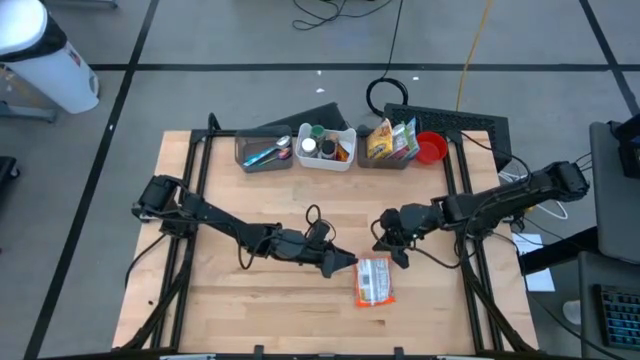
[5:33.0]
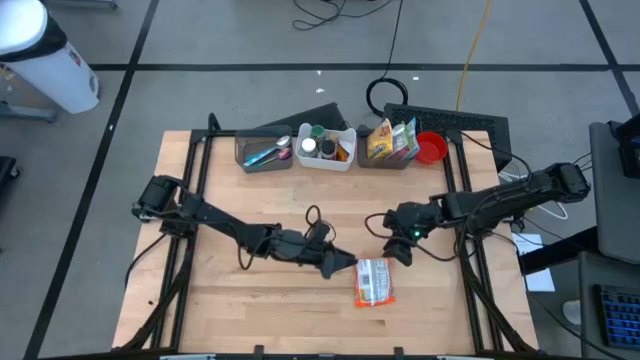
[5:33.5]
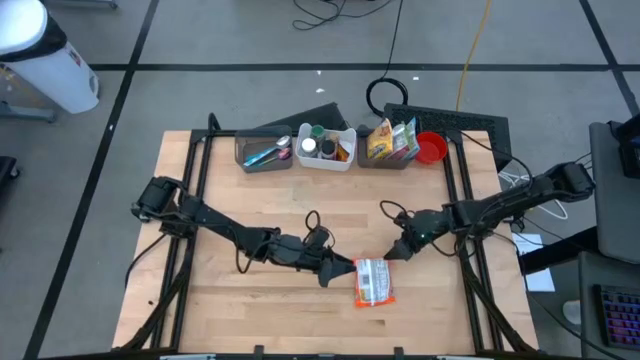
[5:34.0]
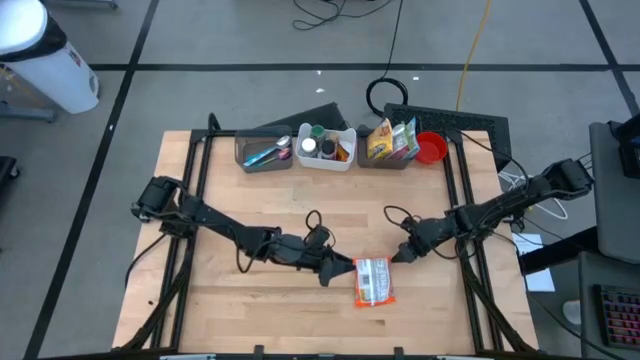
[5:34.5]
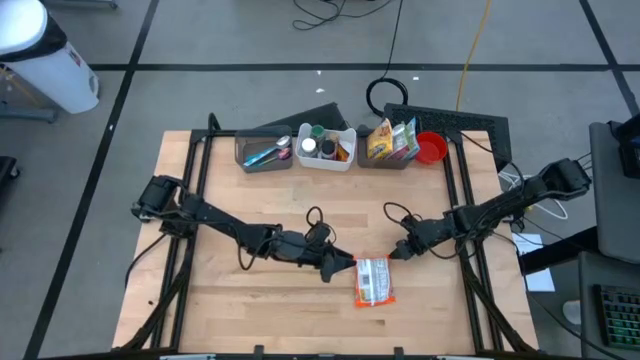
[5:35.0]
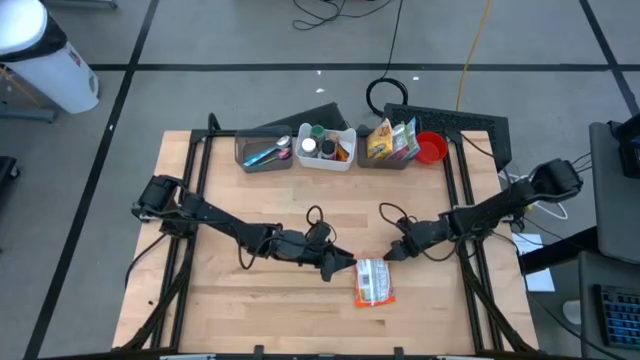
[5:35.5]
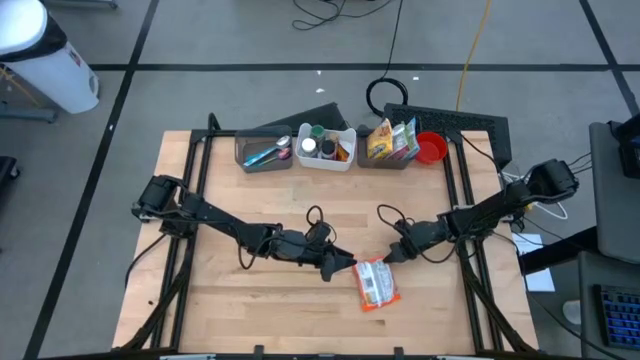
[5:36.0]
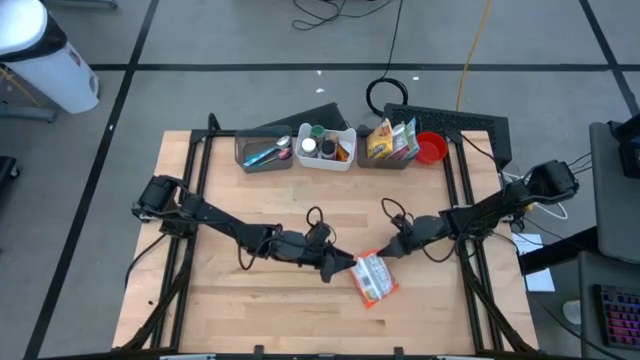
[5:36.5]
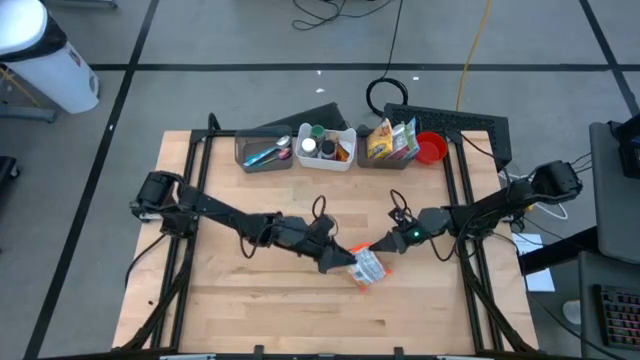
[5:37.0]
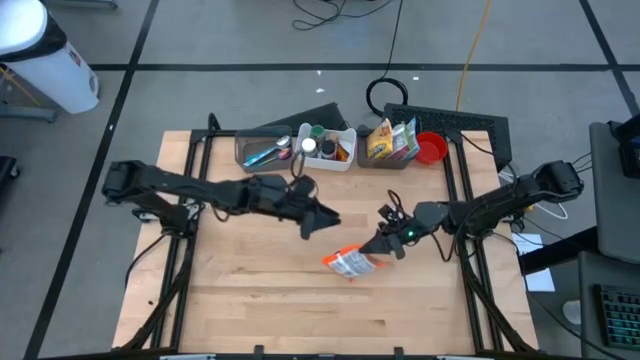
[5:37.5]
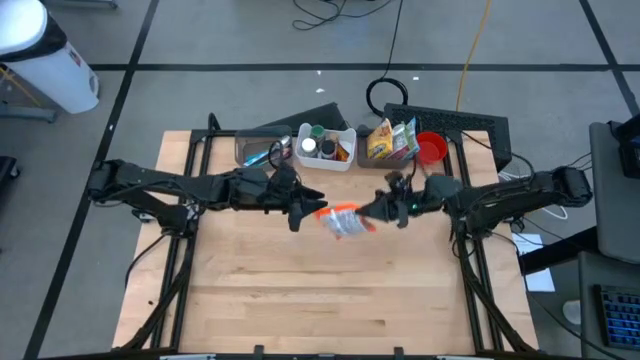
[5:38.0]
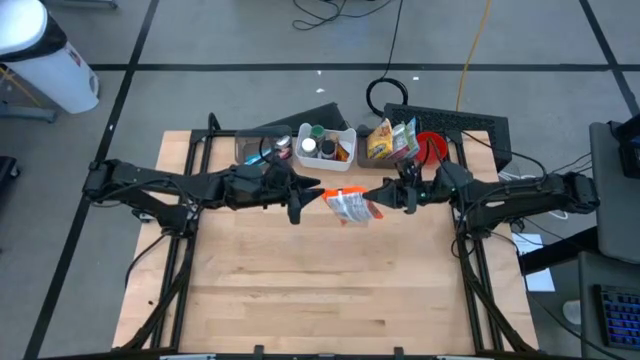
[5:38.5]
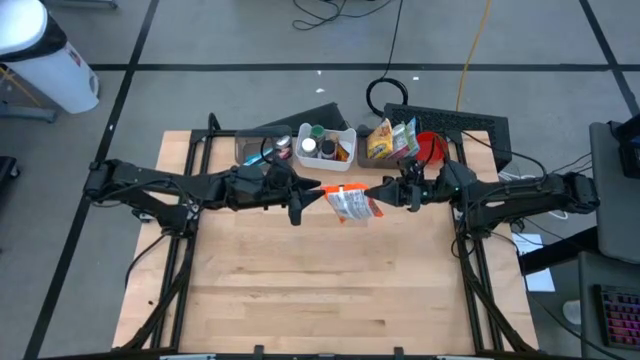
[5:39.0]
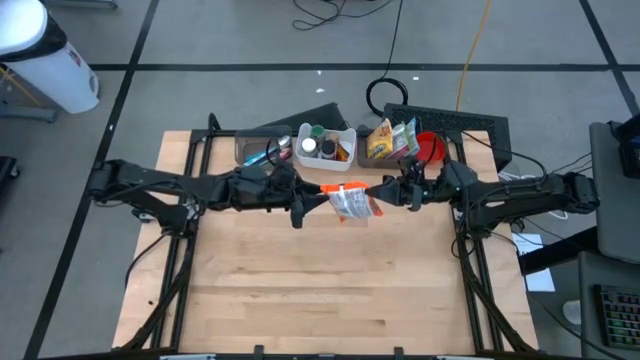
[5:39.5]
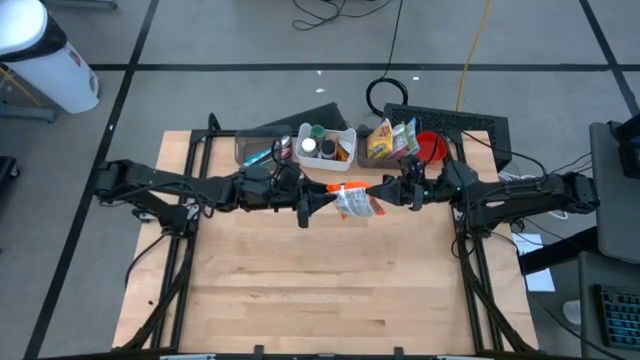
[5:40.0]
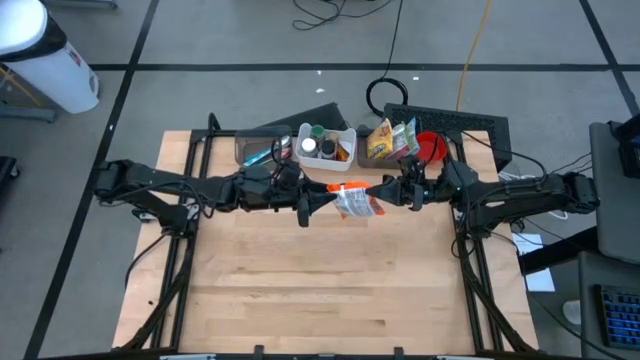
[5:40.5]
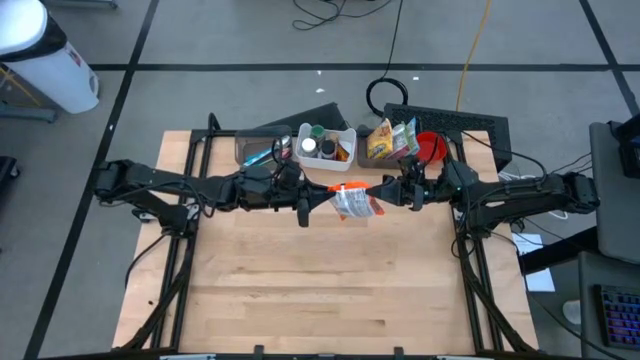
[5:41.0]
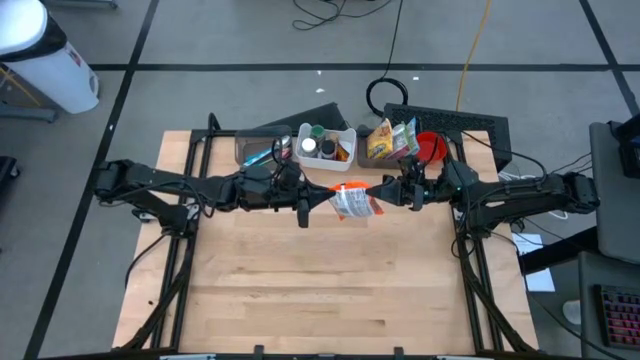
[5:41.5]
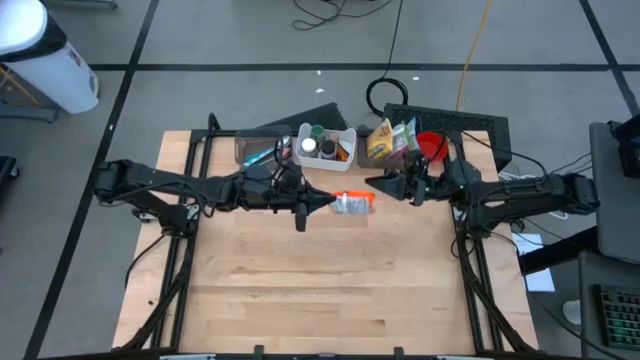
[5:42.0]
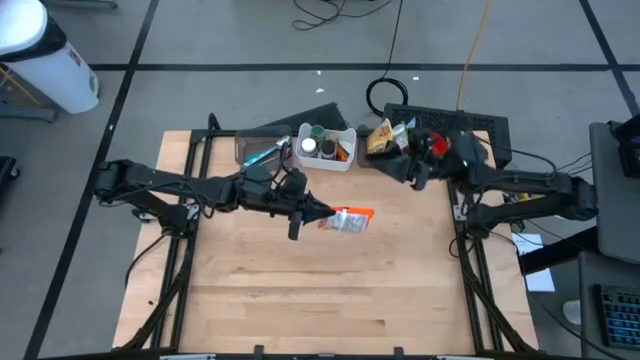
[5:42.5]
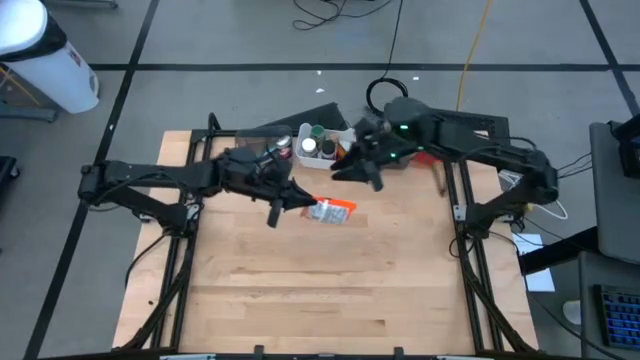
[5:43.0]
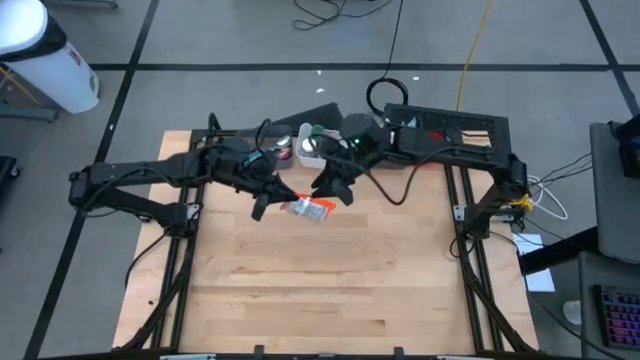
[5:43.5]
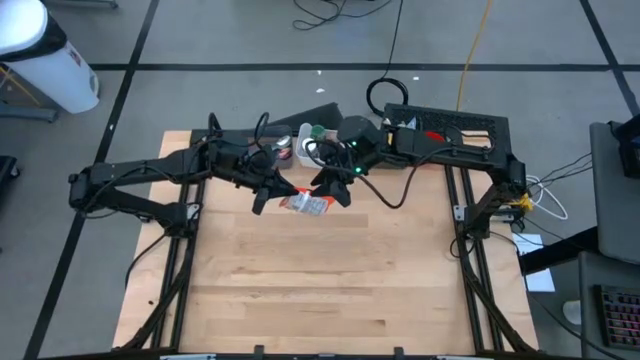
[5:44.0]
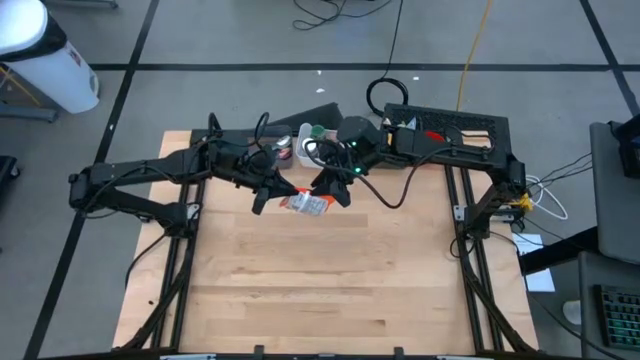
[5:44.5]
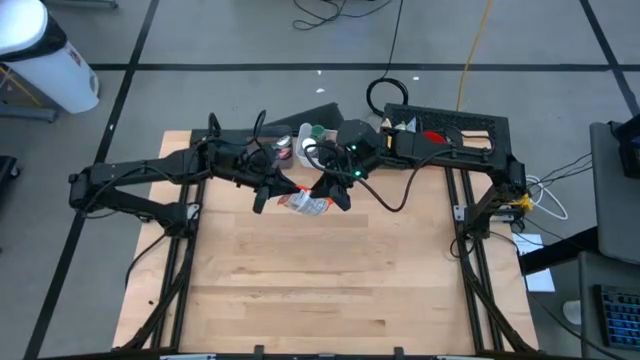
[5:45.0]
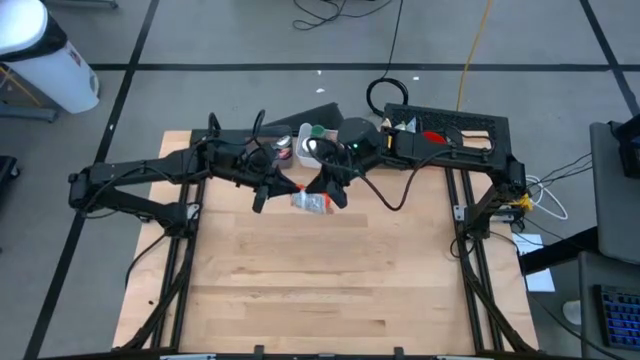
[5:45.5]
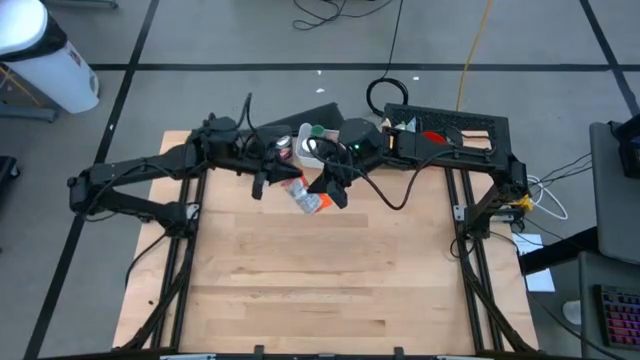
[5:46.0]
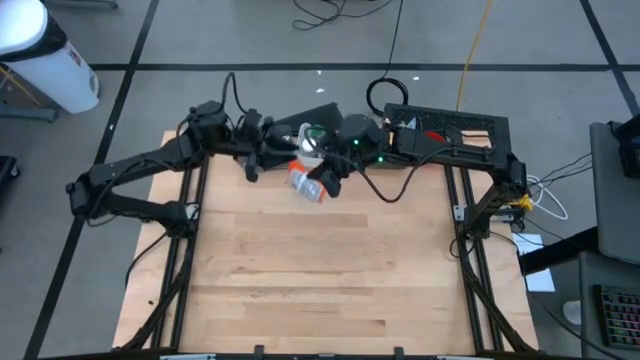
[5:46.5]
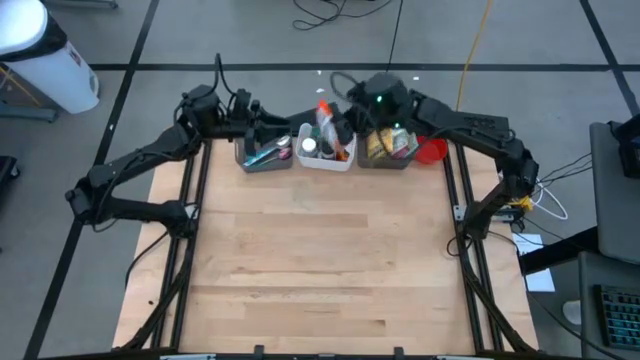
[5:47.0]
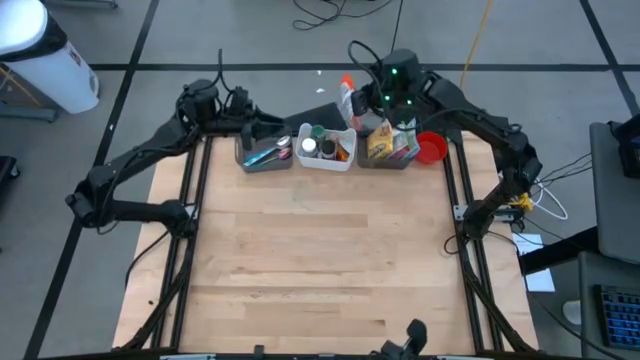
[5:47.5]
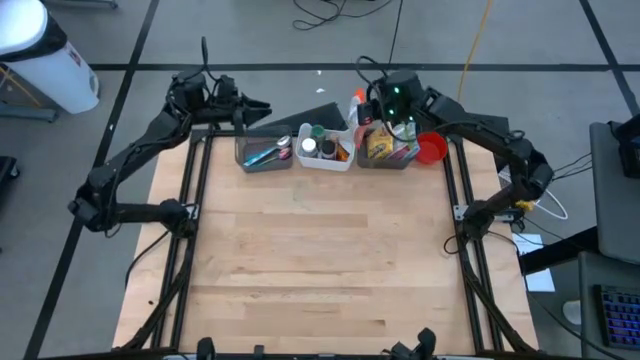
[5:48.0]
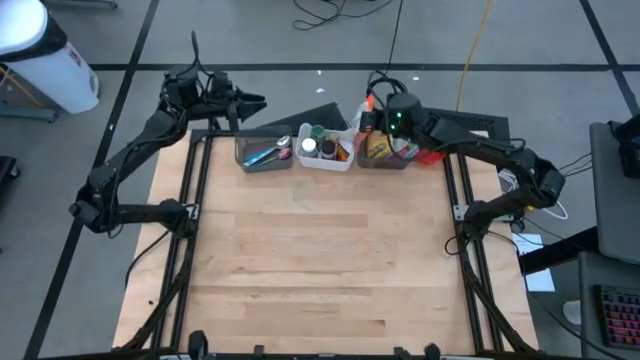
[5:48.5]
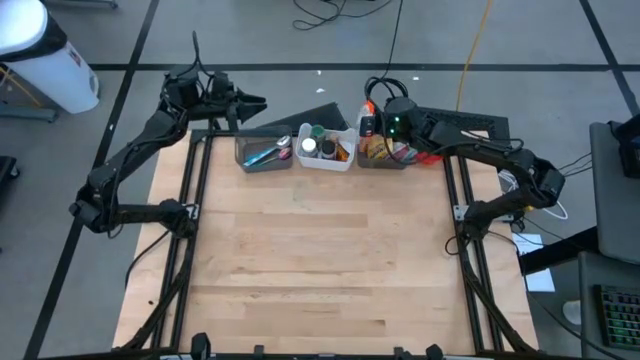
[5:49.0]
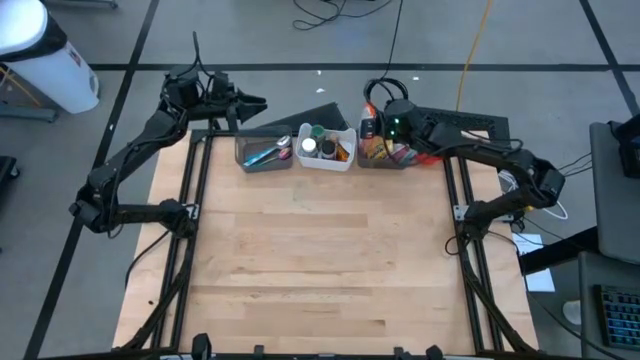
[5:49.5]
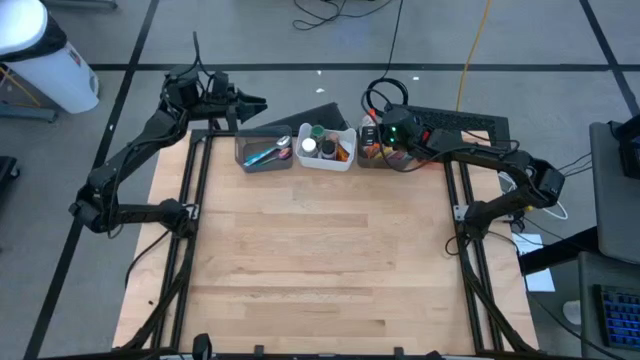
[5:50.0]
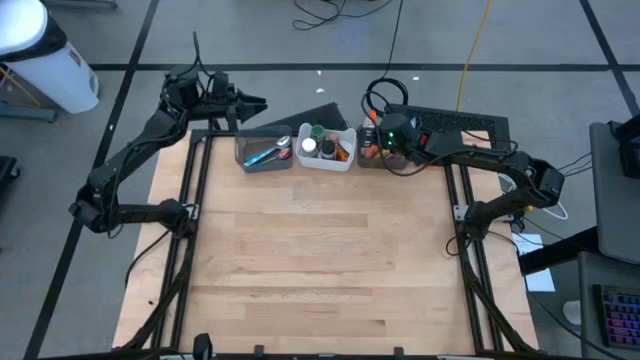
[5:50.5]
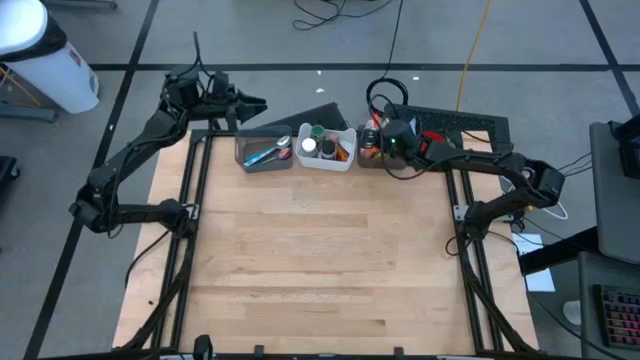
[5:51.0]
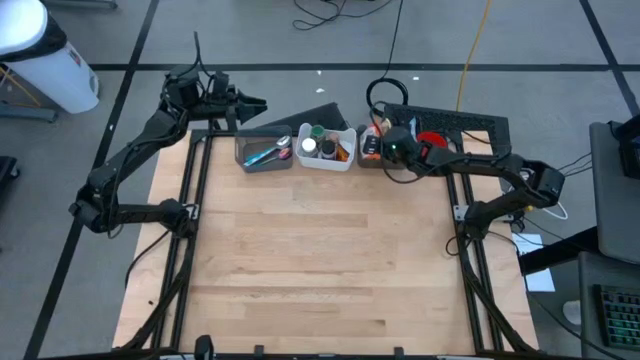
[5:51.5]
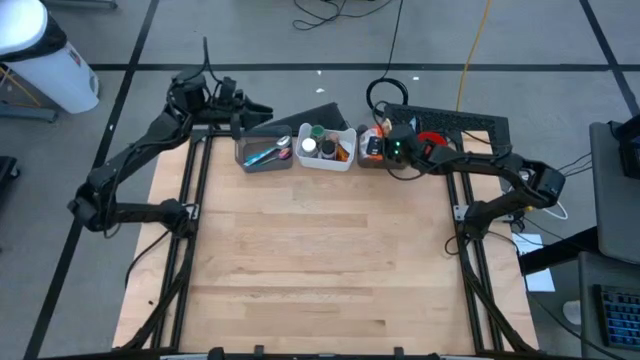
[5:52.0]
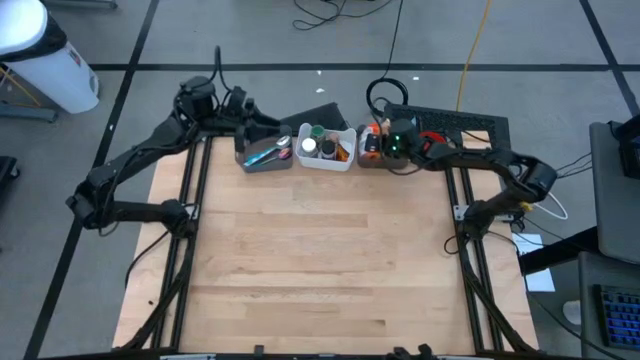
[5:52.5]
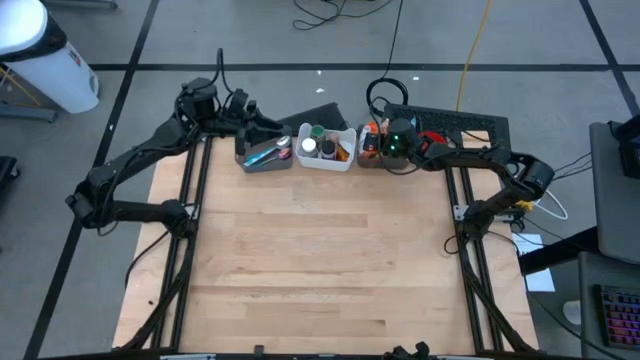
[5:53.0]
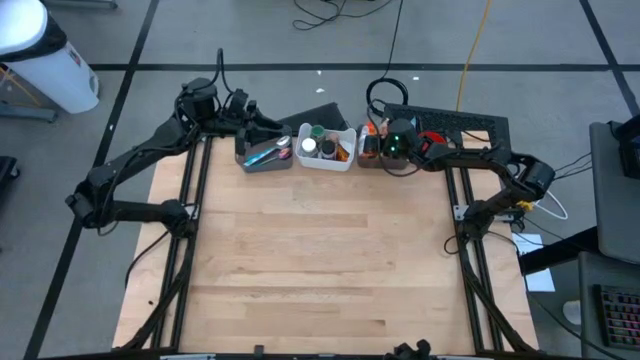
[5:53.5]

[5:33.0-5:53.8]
Task: Pick & Place Food Item
Put the orange noodle pack into the right black bin

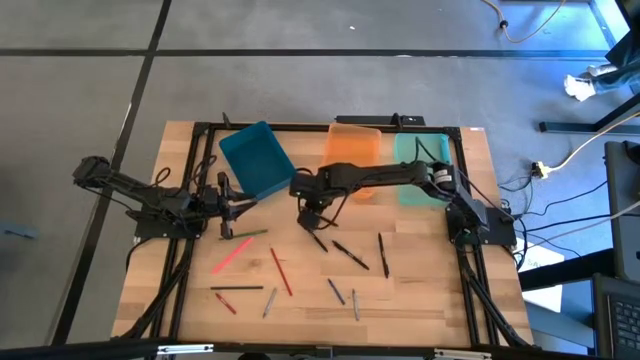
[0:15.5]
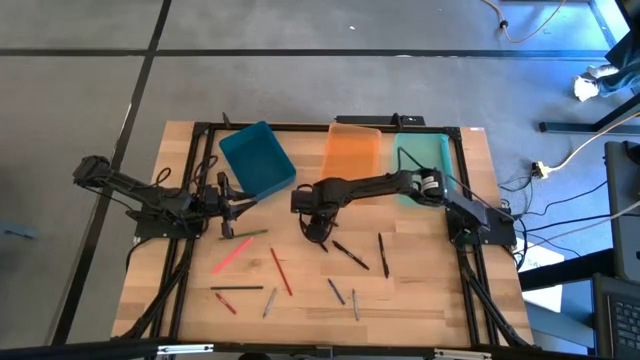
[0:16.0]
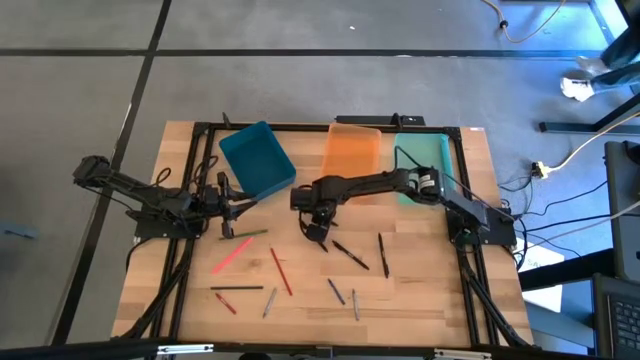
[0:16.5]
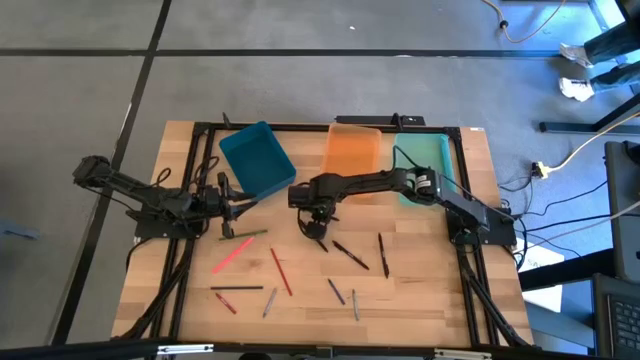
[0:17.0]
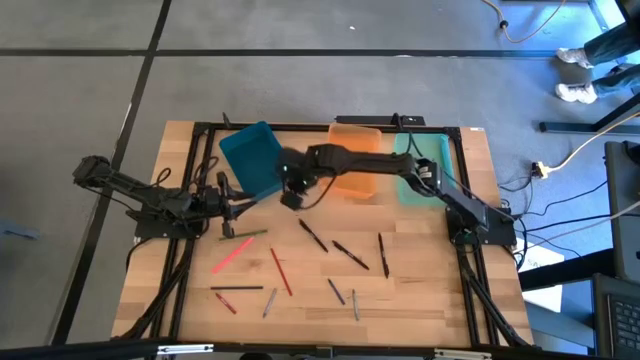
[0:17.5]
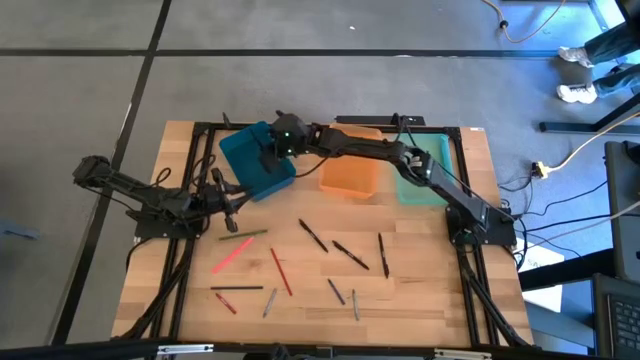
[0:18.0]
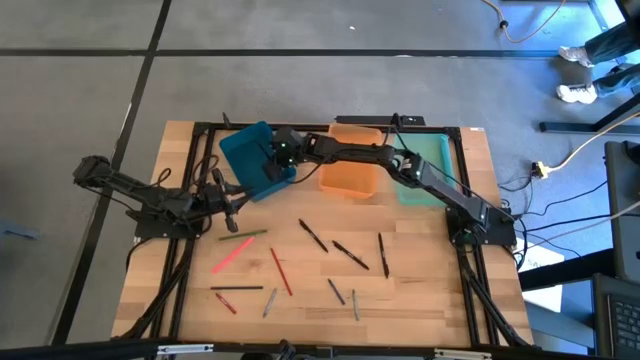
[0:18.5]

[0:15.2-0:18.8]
Task: Sort crayons/erasers/pens/pencils in bins
Put the right black pen into the blue bin
